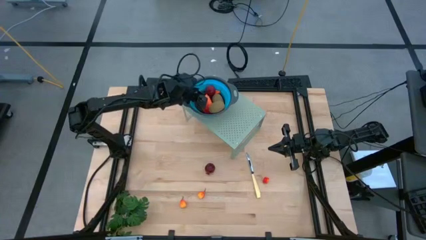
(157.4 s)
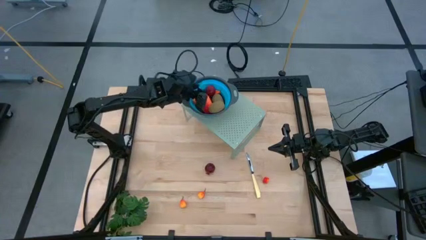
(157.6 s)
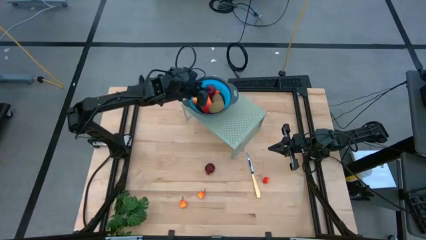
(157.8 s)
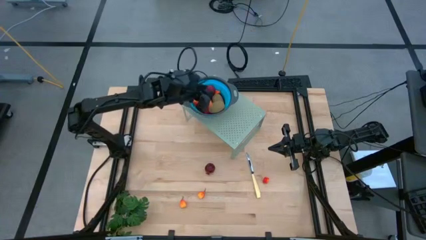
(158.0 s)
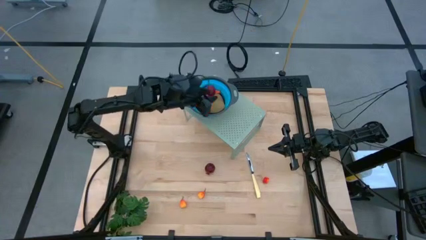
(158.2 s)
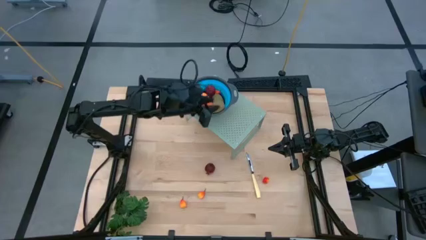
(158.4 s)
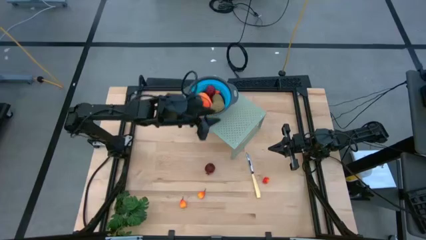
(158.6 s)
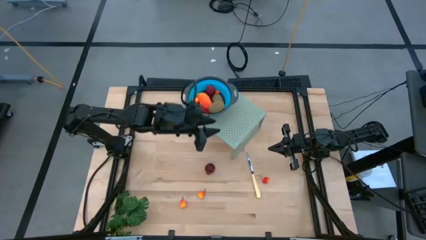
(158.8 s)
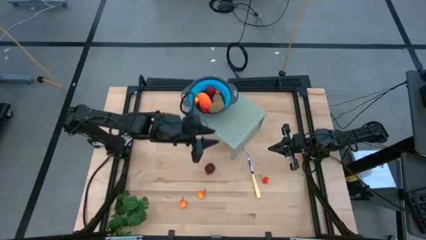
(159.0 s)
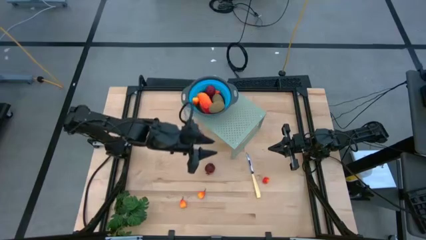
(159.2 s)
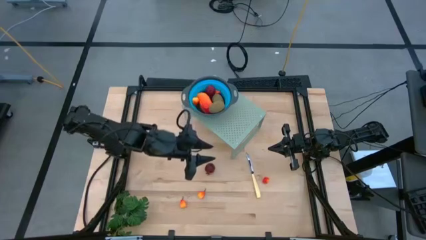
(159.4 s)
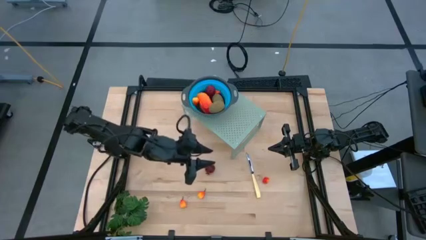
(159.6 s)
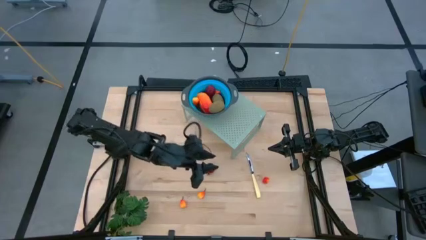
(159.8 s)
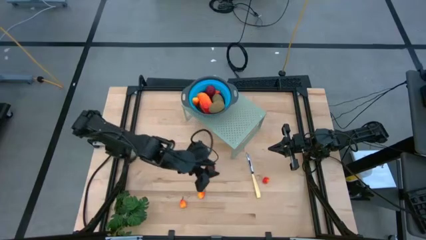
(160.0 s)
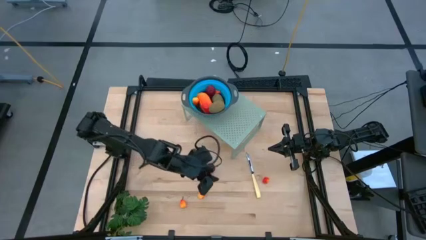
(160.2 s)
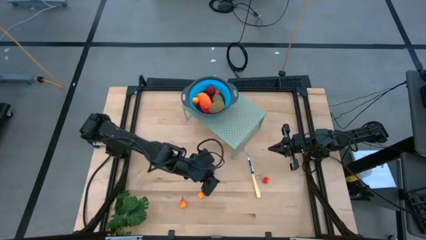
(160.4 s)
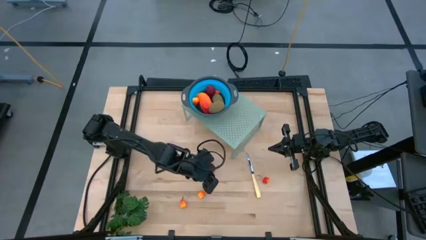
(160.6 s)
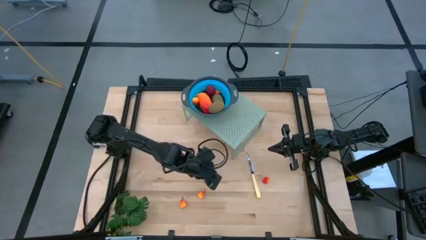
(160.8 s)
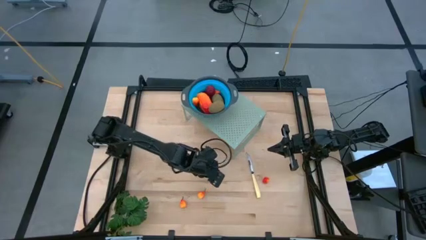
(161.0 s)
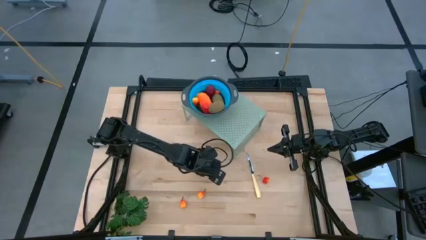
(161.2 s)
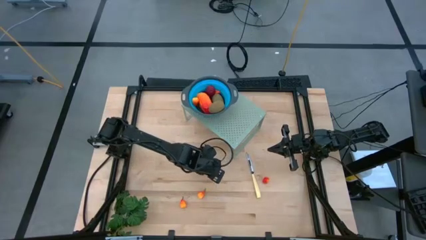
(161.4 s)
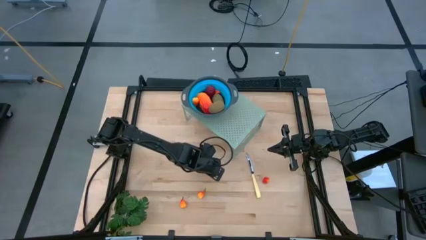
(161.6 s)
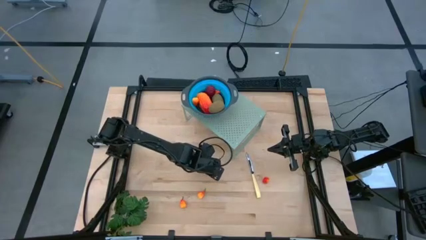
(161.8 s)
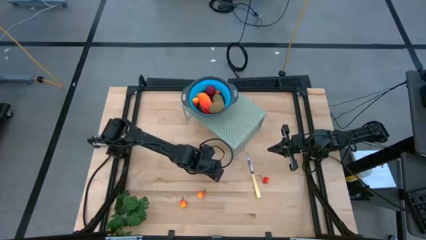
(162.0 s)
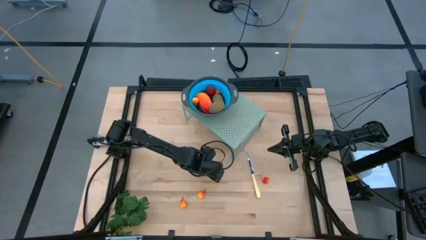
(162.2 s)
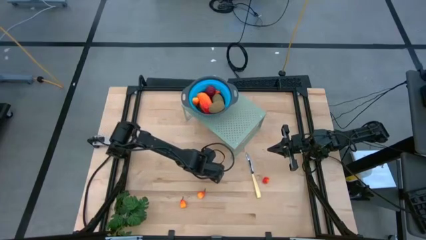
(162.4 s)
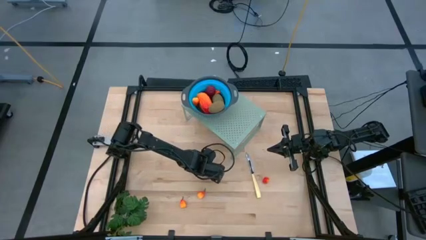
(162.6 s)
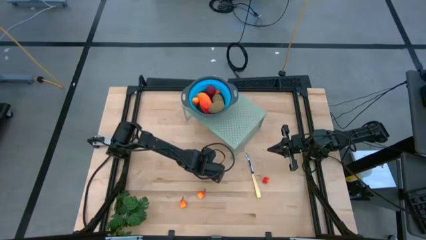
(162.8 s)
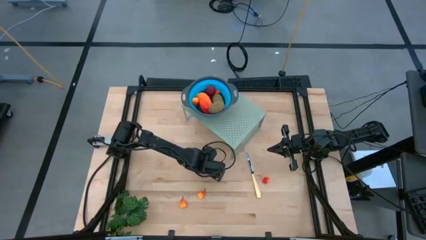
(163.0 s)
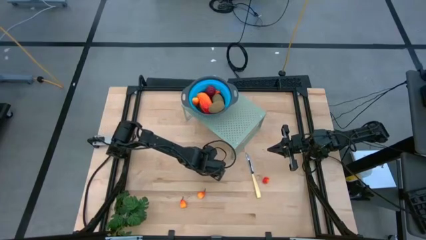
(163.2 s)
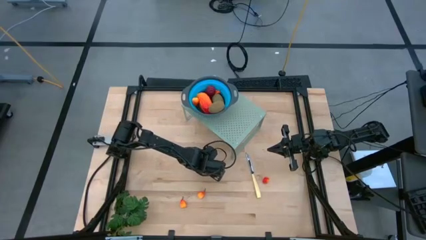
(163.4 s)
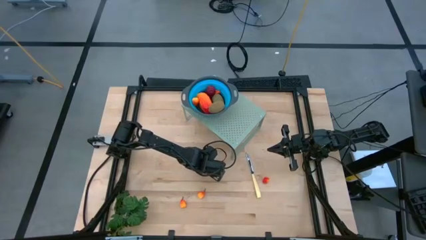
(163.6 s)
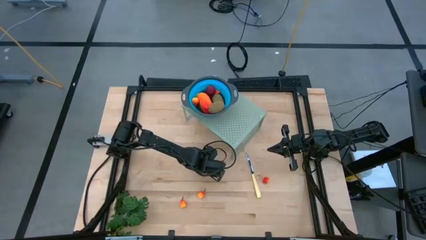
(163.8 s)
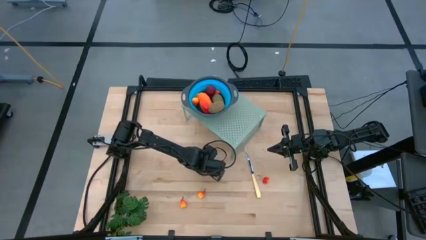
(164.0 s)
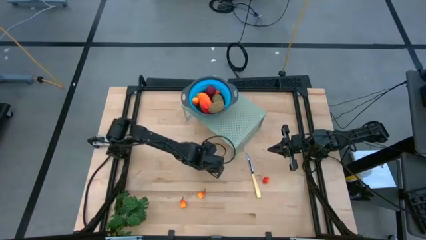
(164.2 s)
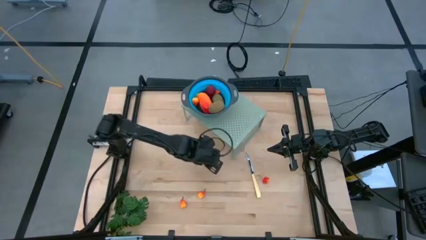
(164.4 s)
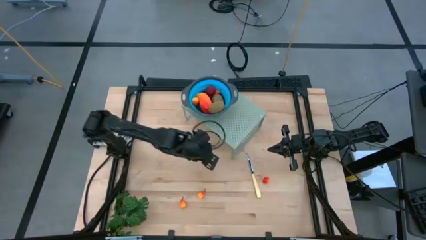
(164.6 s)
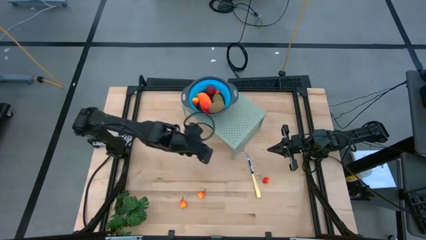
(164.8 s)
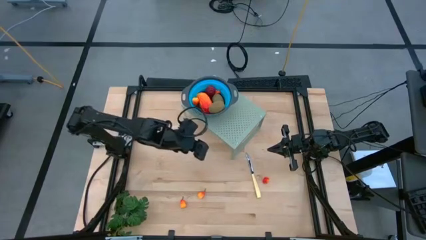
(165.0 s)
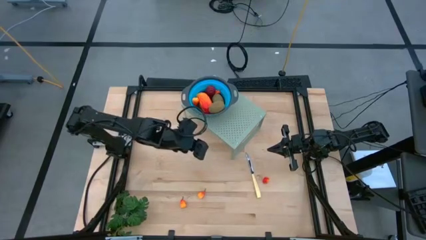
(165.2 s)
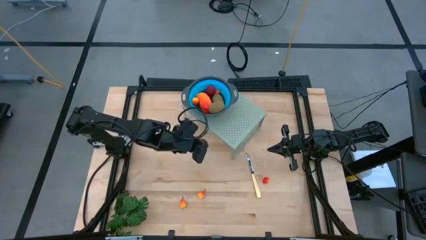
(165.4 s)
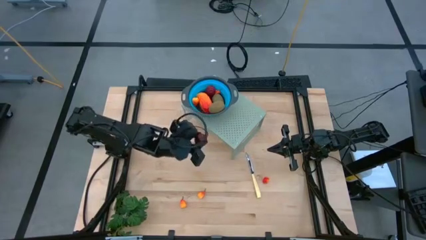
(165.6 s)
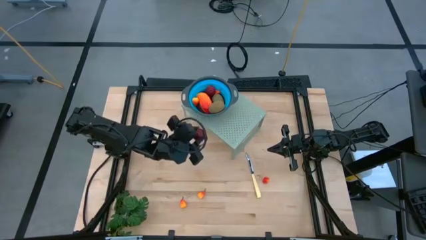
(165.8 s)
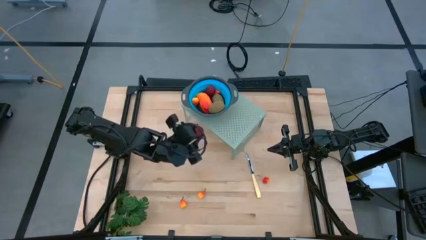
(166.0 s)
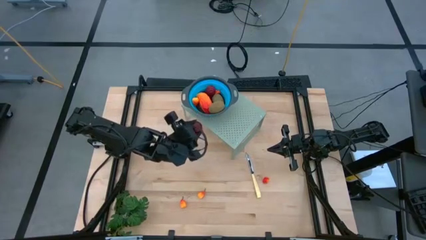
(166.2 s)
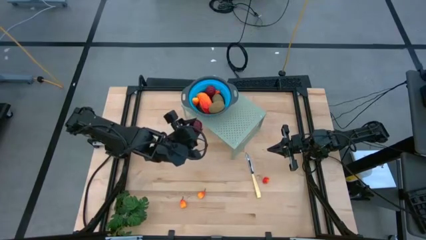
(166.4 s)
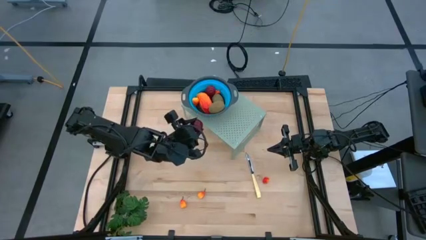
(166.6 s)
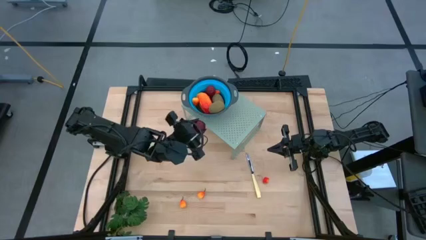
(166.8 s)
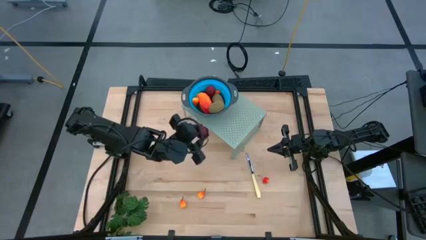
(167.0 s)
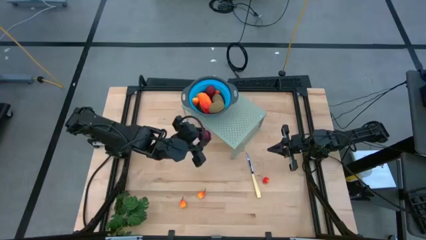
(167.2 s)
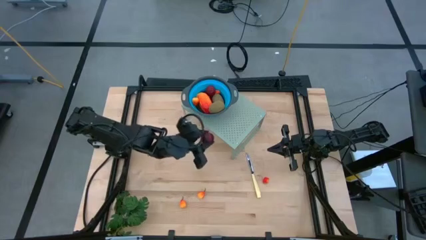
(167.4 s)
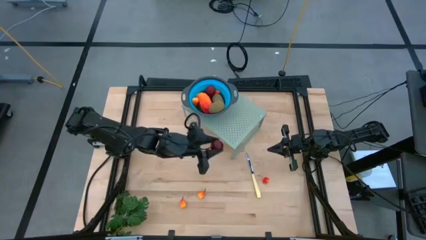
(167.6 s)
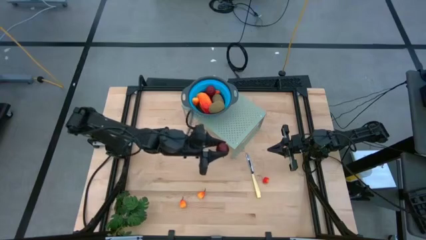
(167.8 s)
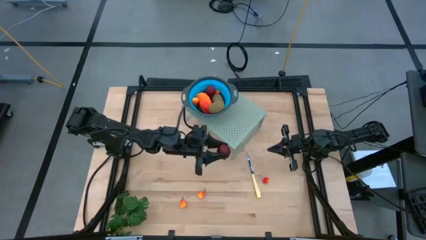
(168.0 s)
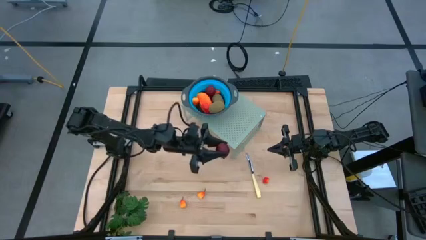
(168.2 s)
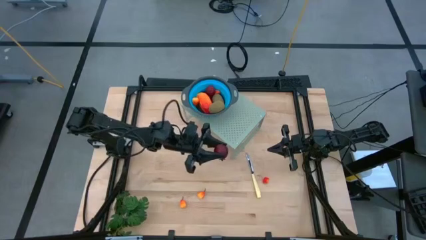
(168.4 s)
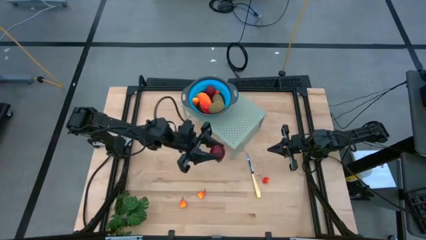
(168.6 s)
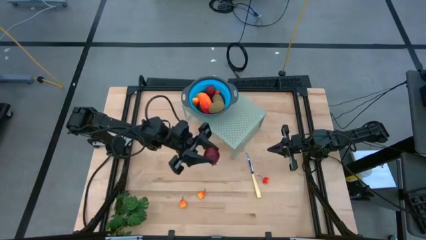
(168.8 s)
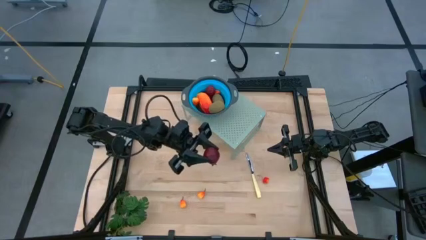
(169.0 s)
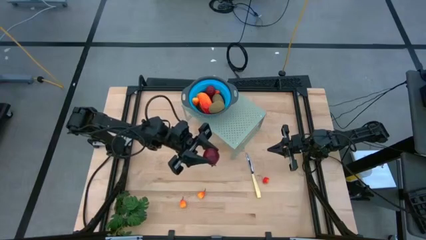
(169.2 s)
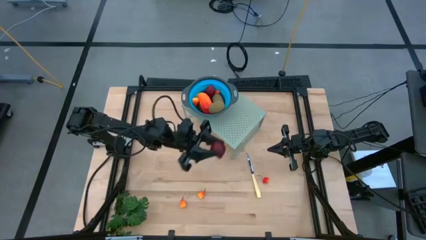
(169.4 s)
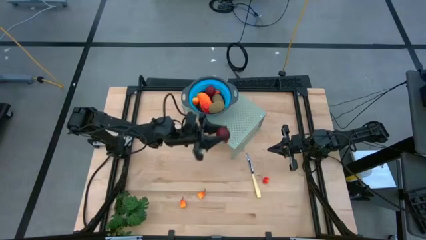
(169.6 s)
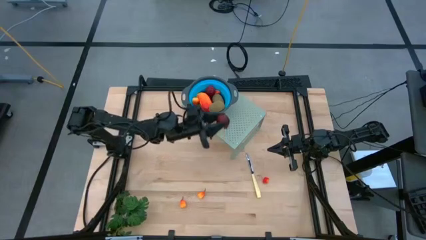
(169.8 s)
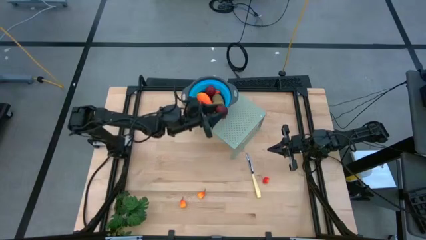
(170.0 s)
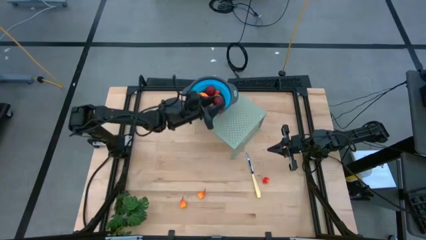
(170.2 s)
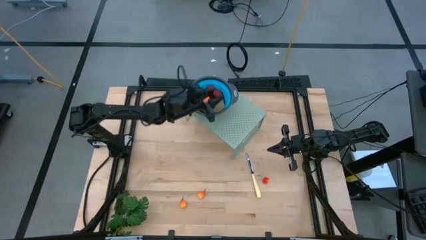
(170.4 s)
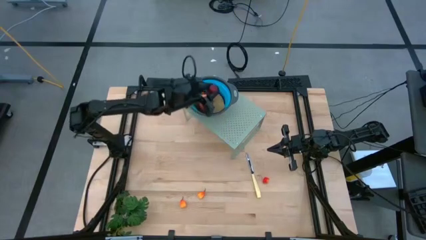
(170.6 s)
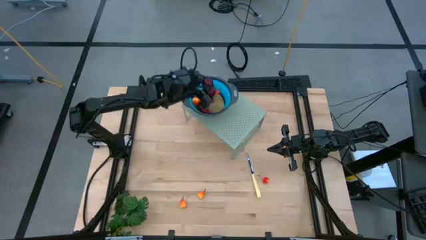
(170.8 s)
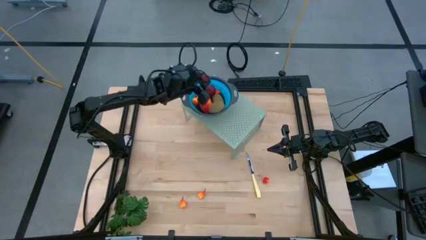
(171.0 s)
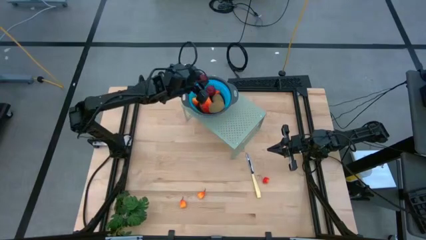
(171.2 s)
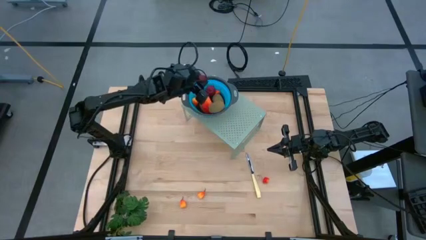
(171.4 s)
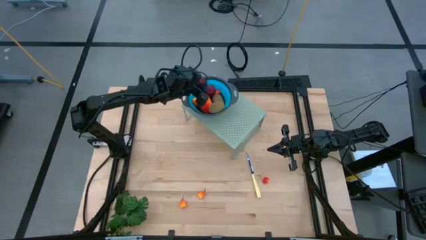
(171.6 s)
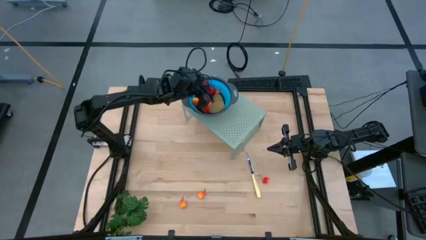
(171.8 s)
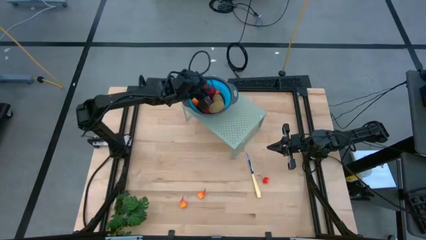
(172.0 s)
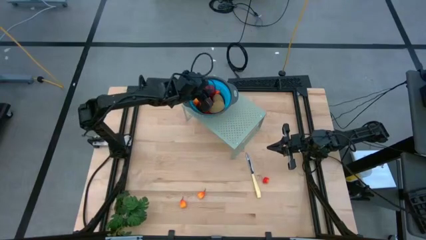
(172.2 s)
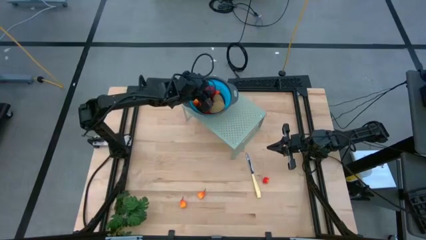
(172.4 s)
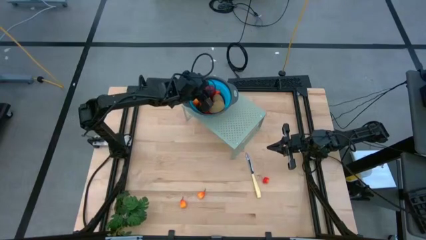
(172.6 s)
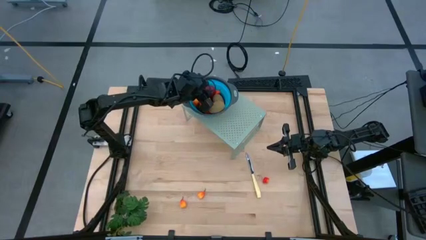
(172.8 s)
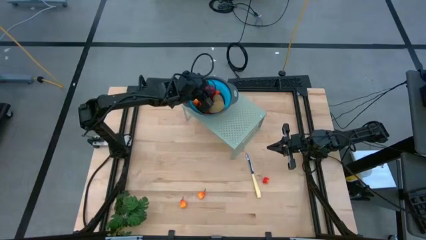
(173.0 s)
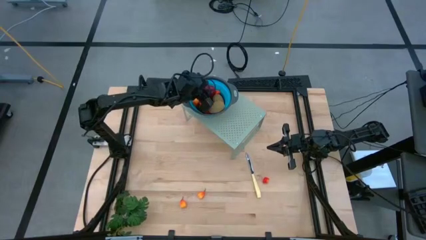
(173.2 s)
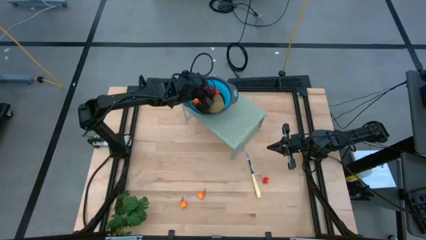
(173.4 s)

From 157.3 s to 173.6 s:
Task: Pick & Place Fruit
Put the pomegranate into the blue strainer bowl on the shelf

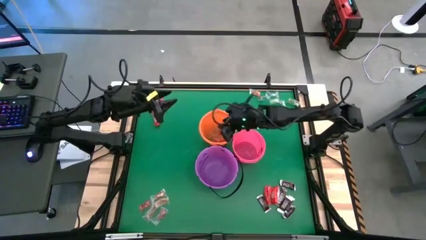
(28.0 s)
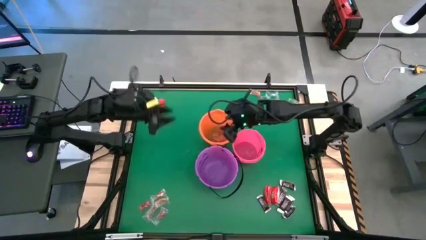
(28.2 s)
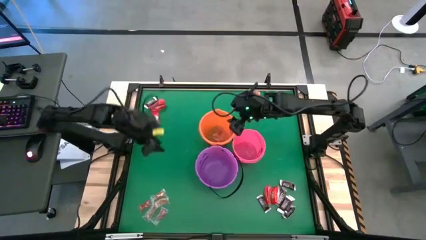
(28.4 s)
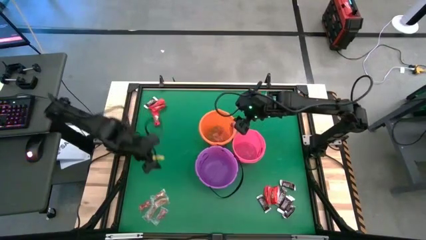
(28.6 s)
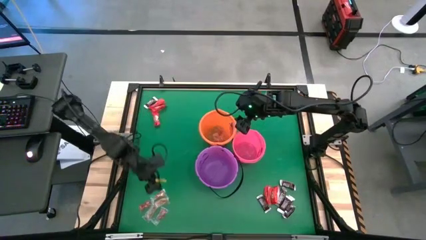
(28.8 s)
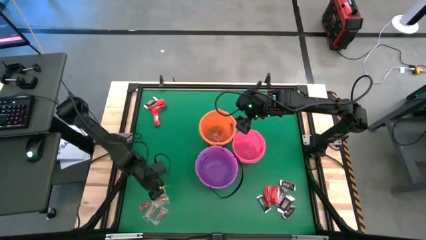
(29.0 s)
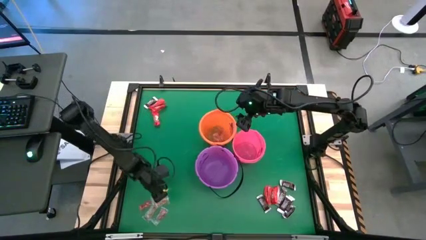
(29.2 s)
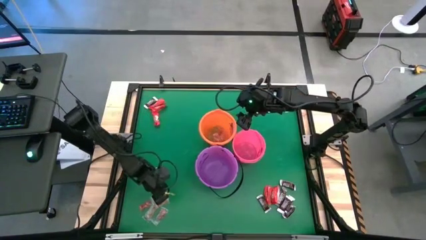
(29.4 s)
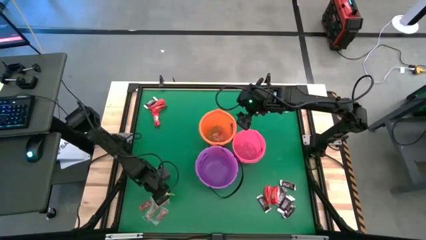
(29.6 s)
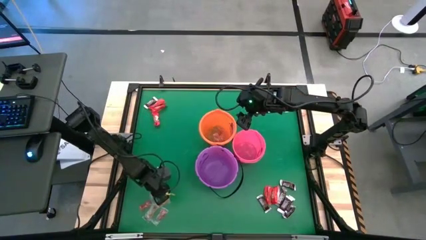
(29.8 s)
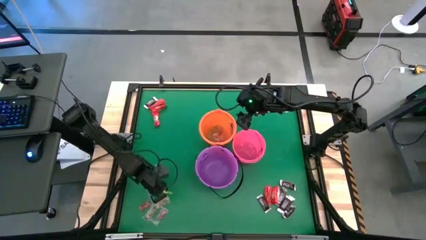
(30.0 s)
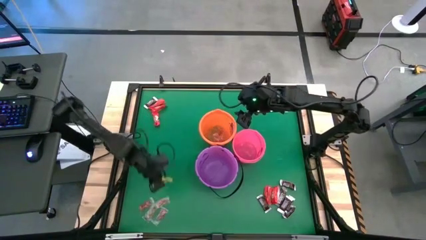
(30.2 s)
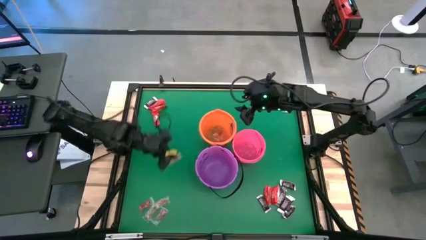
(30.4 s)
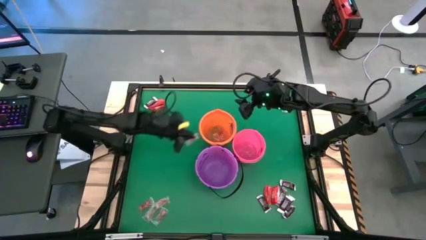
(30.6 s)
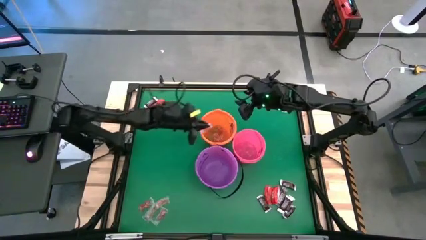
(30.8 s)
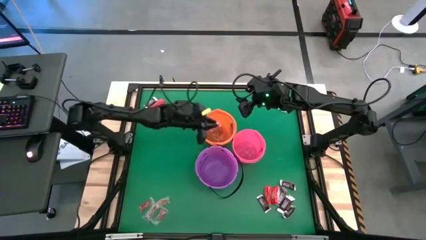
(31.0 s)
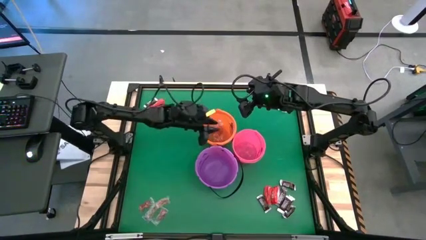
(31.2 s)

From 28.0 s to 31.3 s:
Task: Sort candy by brand, put in halloween buckets
Put the orange gummy into the orange bucket
